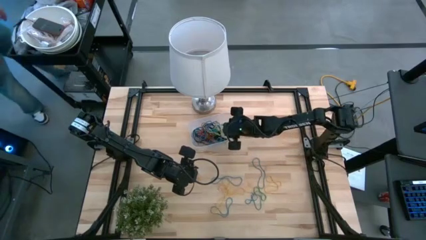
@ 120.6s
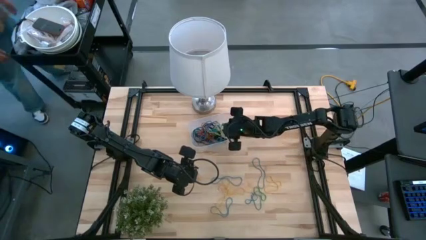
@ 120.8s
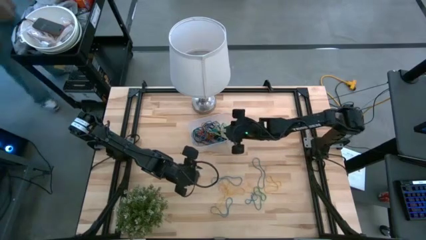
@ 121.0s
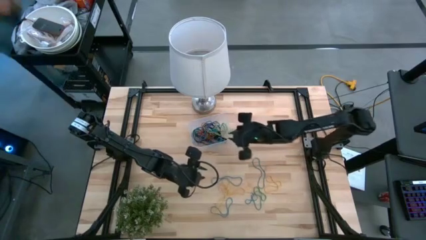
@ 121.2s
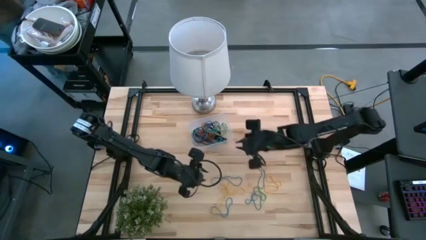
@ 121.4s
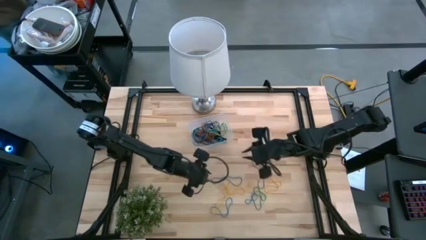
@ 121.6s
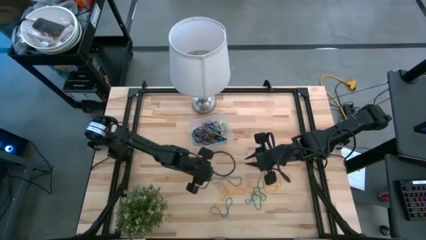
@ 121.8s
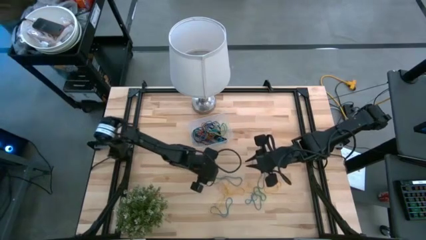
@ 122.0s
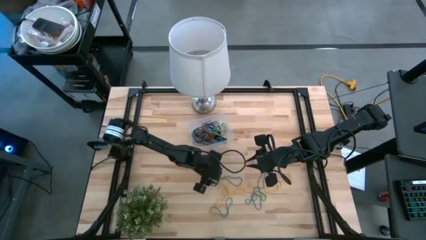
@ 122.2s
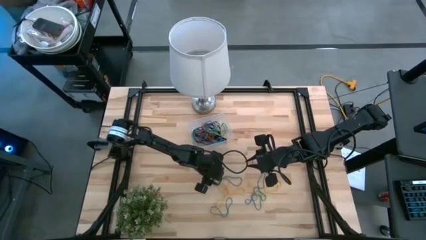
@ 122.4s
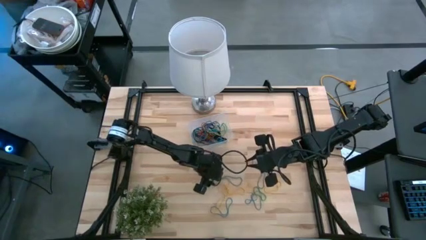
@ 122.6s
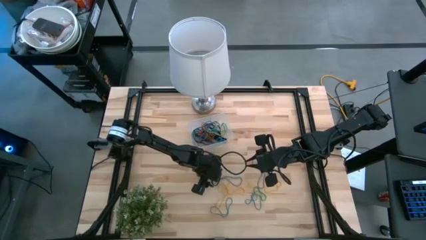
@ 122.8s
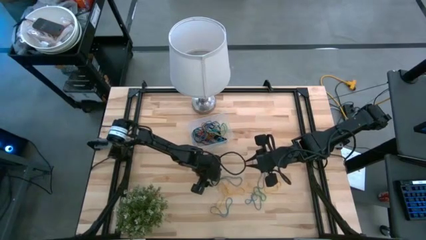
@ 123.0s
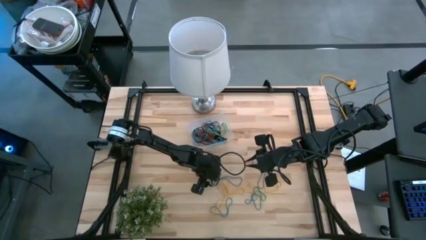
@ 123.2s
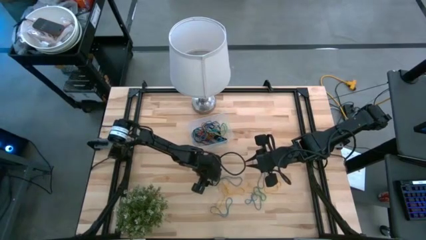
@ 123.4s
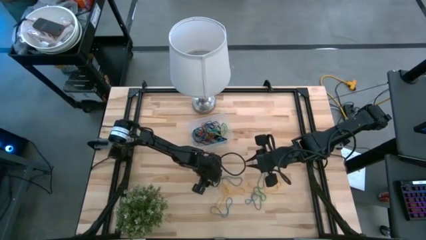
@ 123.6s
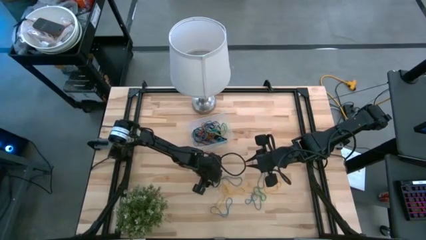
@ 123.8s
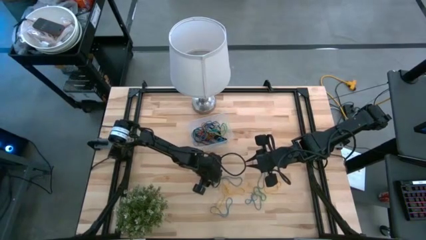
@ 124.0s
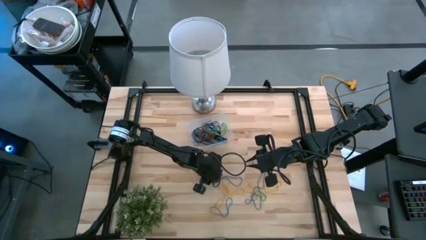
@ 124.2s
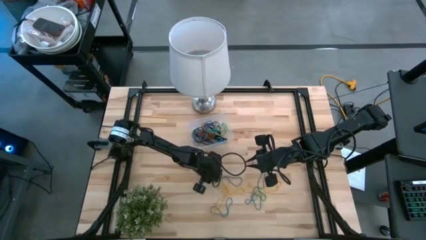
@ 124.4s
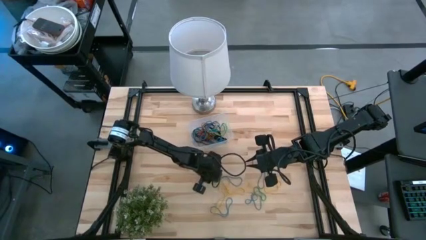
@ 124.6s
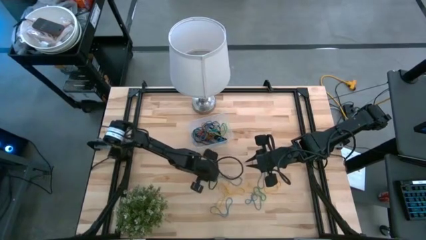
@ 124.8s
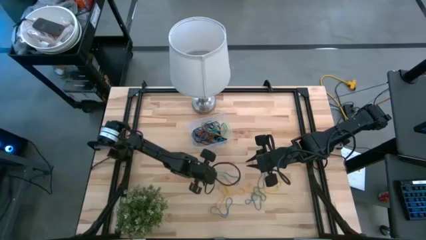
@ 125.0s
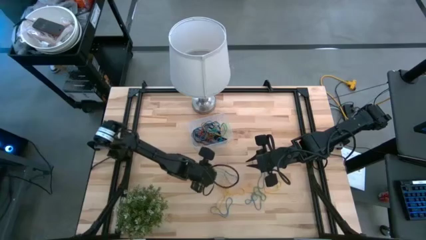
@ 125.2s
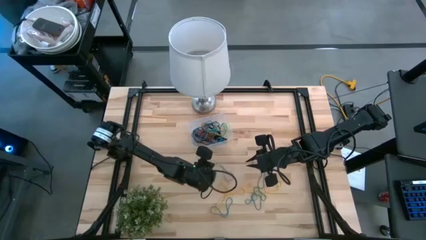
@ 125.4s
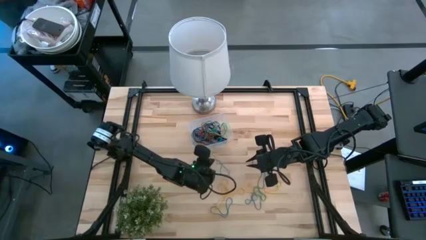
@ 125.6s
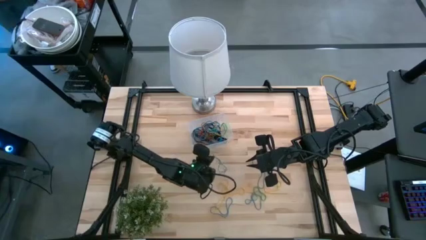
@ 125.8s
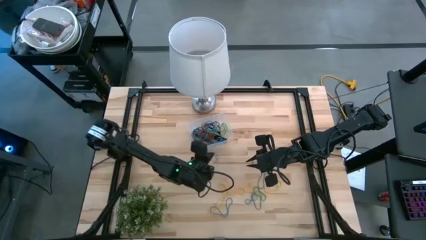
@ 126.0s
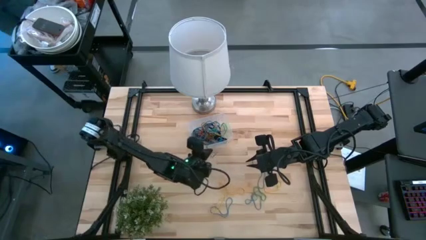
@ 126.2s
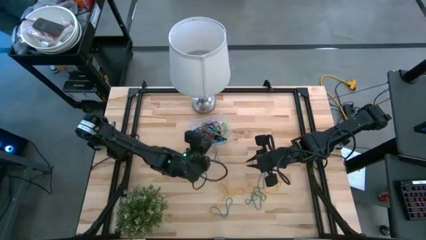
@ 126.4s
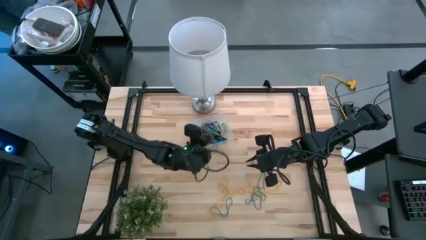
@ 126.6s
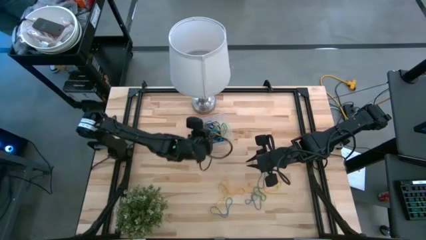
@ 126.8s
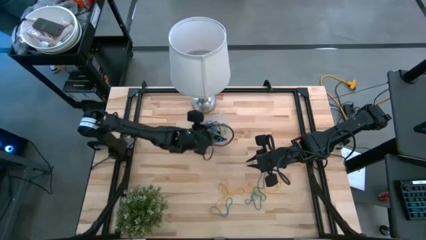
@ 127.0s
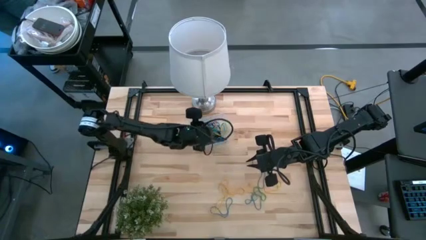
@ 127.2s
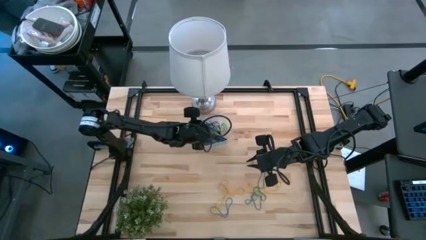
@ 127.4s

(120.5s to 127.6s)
Task: Pick and place rubber bands into bin
Put the blue rubber band into the transparent container

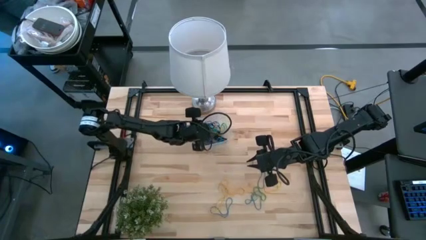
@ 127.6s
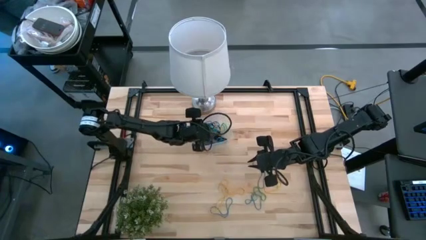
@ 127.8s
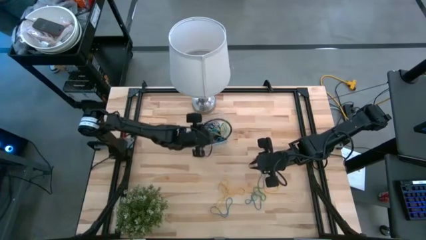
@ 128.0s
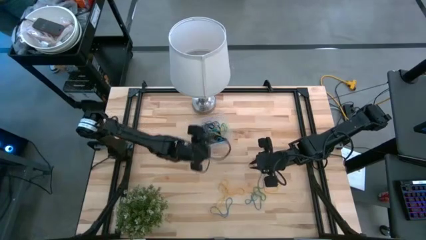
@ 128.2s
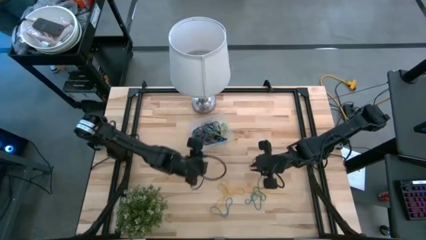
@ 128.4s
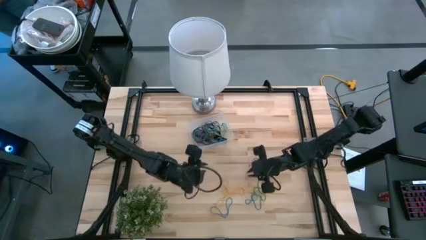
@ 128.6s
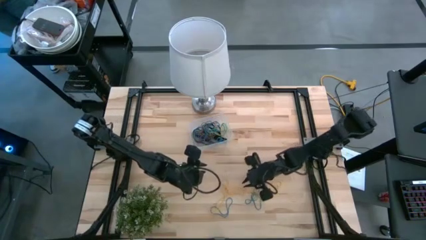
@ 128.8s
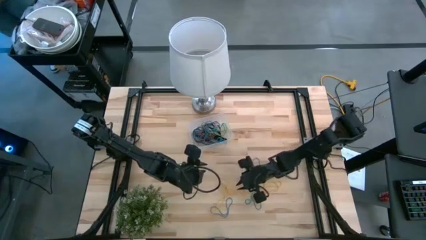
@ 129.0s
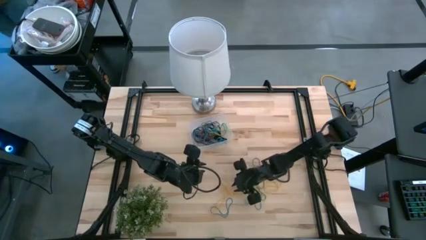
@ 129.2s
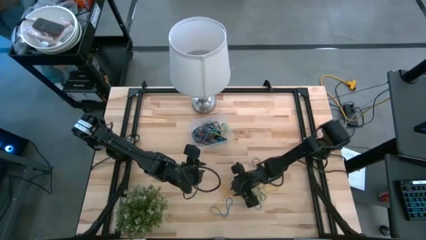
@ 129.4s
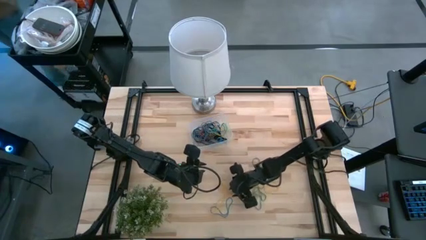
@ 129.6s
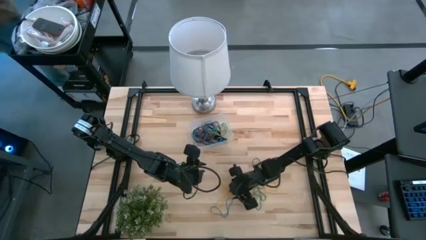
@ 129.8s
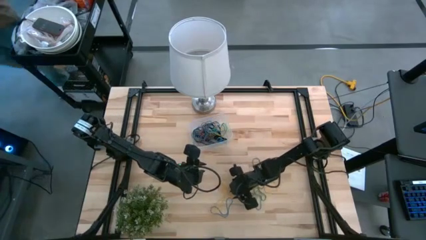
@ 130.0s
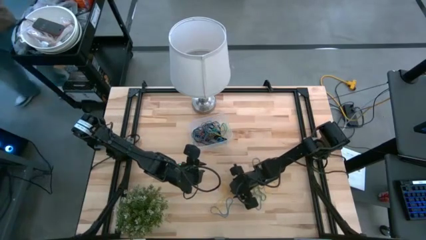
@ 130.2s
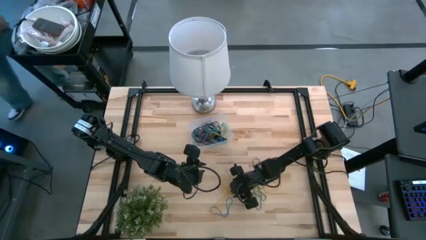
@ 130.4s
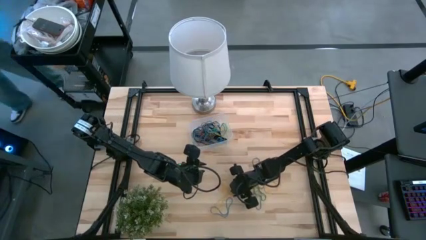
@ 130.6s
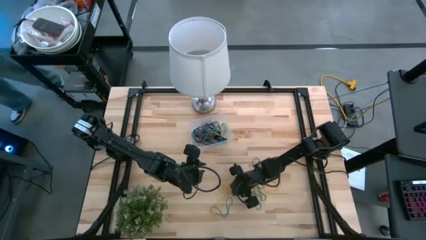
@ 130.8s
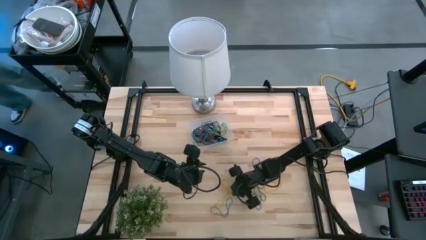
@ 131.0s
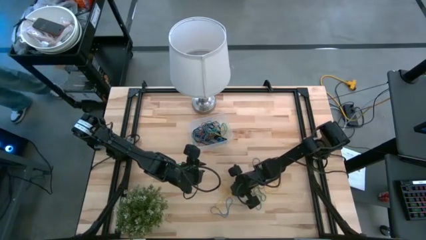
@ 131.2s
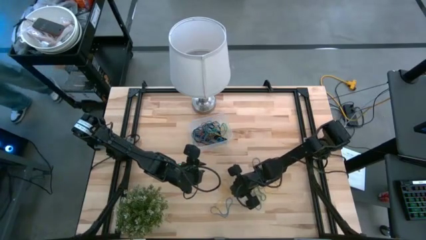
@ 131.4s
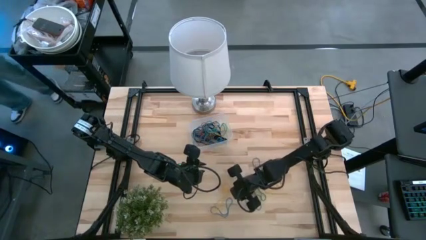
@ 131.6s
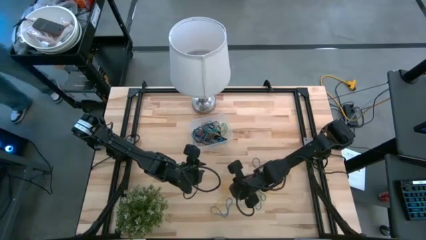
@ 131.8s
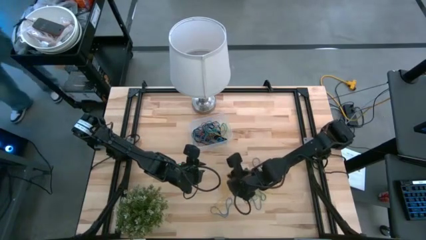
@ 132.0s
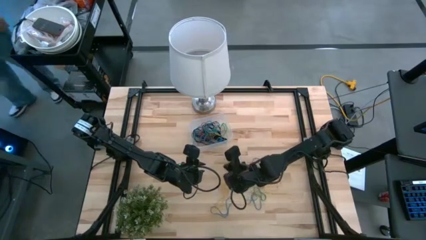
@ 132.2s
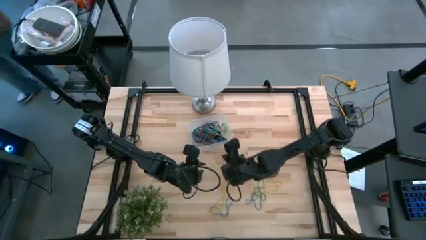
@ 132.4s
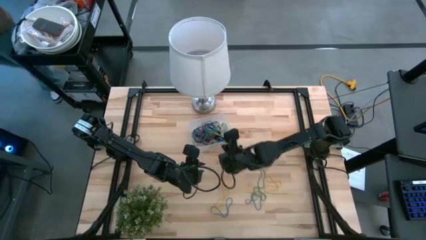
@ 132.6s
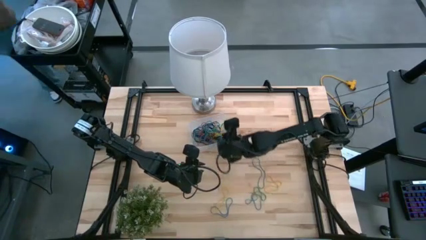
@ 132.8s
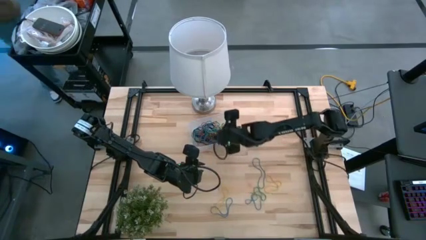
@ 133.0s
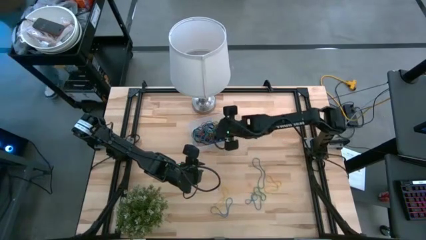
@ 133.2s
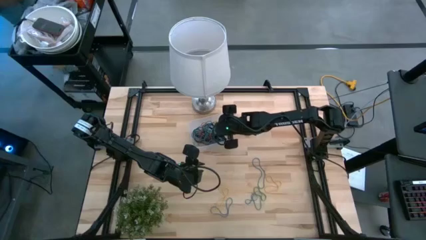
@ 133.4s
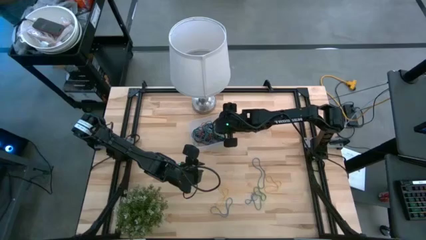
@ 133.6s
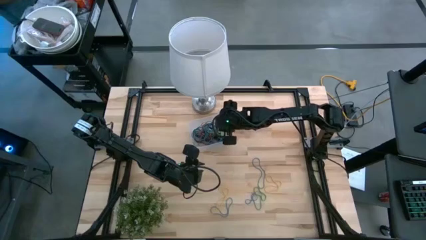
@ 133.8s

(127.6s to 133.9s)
Put the yellow rubber band into the transparent container

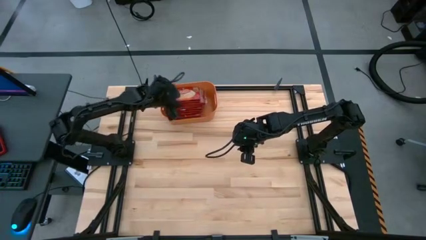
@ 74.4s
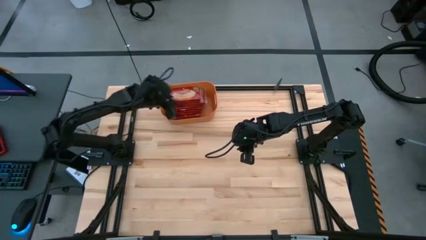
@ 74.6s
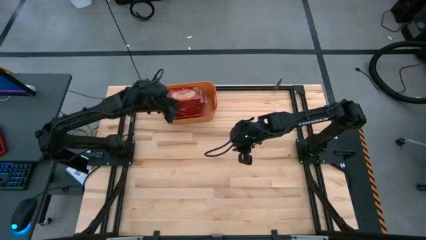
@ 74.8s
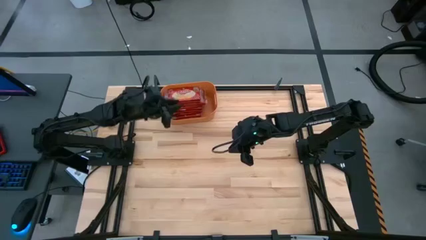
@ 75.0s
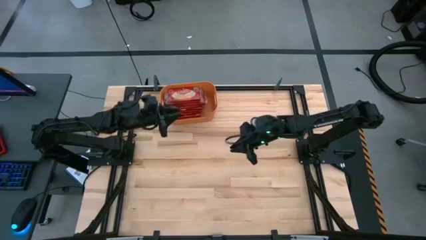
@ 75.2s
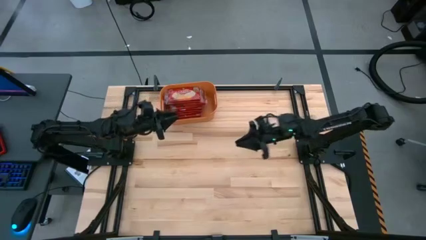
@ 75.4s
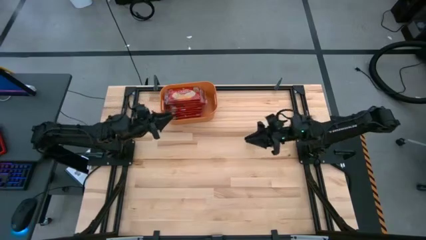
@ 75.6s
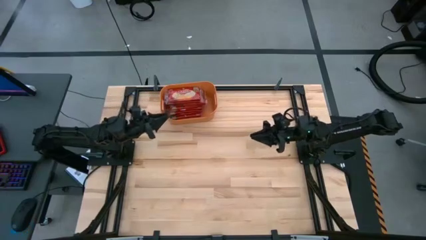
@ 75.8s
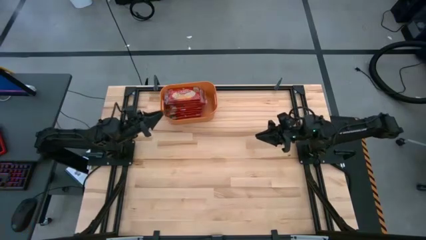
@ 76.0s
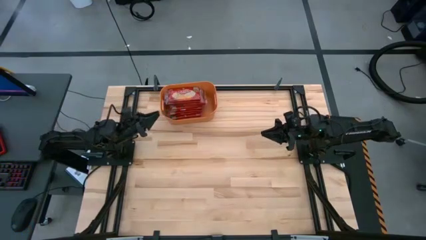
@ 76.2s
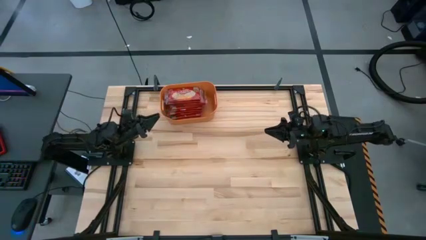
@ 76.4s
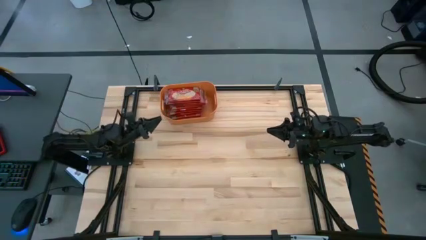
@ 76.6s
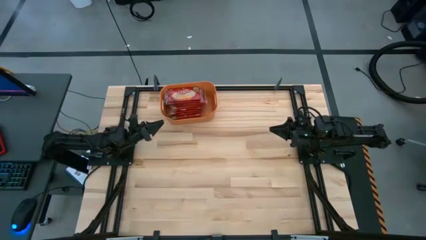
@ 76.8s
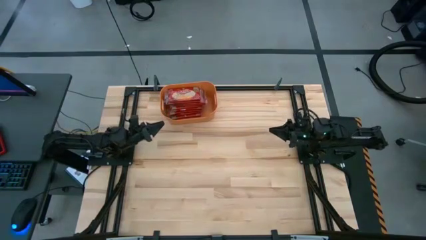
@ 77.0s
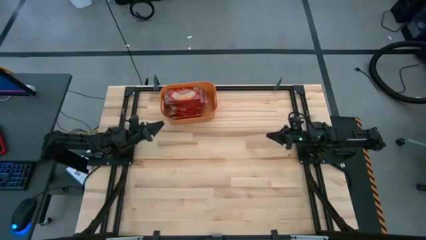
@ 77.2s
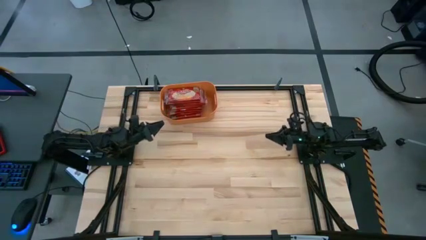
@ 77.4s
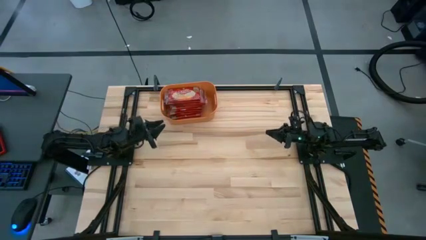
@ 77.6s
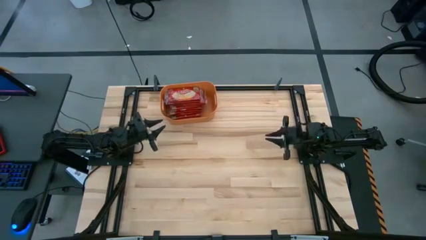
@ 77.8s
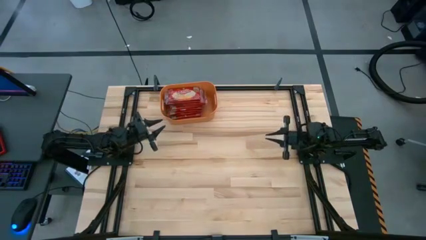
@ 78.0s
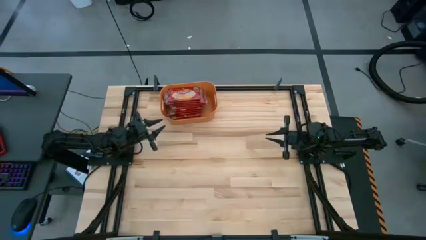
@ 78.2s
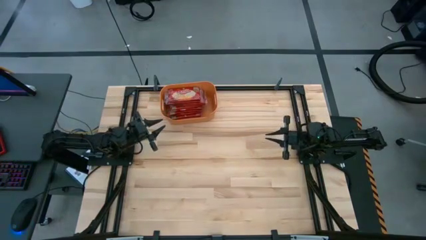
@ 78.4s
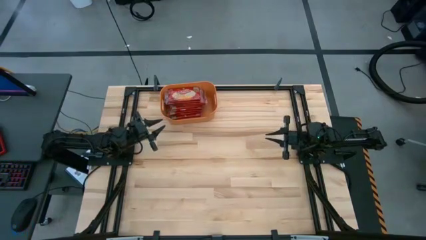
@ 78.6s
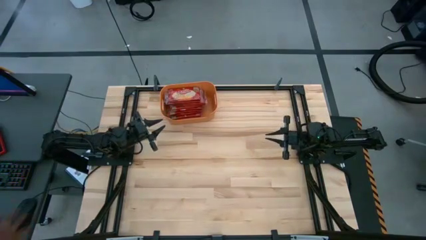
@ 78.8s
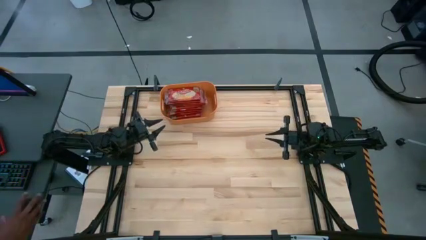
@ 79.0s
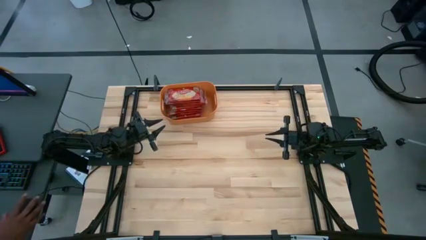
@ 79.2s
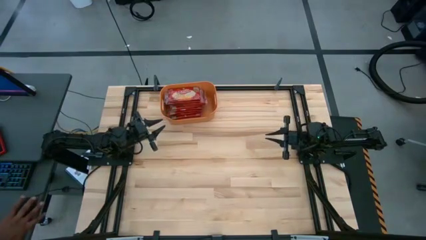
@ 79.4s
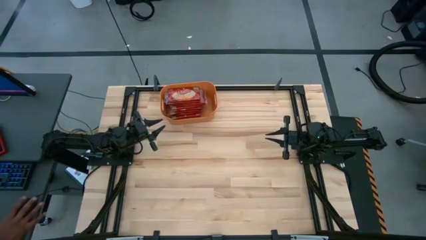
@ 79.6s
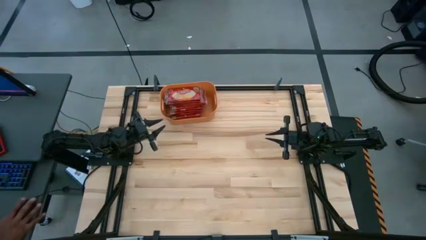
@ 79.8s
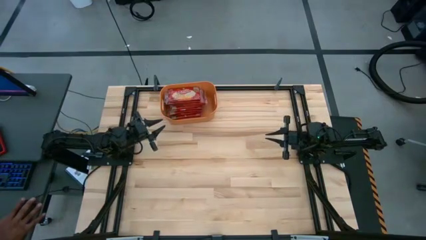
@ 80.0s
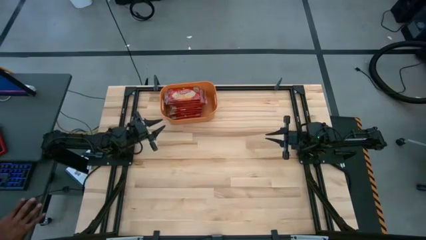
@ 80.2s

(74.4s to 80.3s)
Task: Sort popcorn bags into baskets
Return to Home Position
